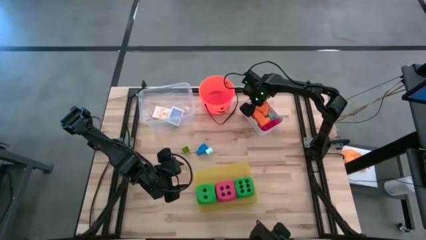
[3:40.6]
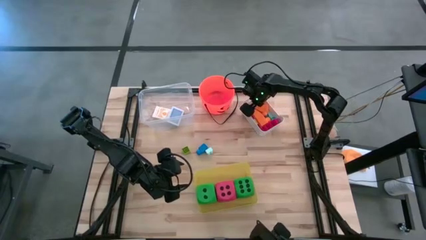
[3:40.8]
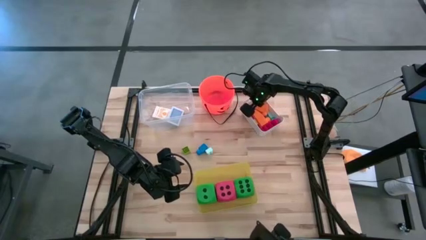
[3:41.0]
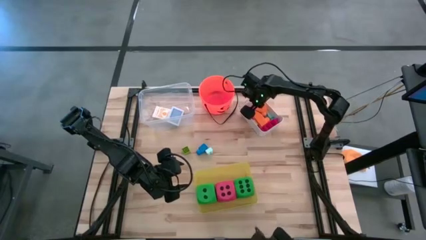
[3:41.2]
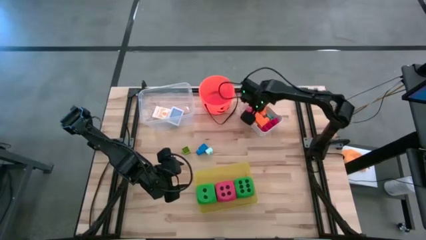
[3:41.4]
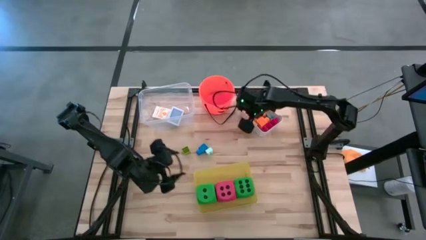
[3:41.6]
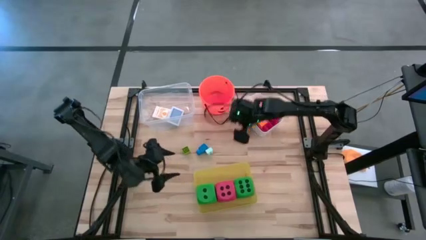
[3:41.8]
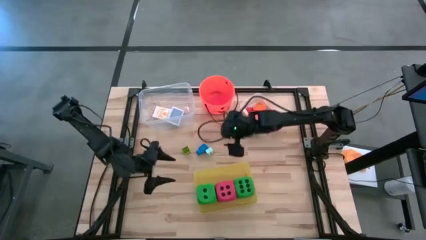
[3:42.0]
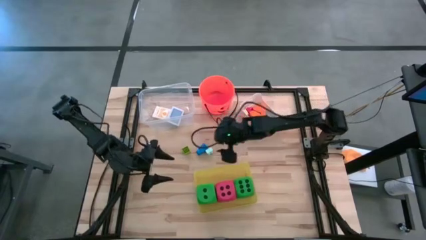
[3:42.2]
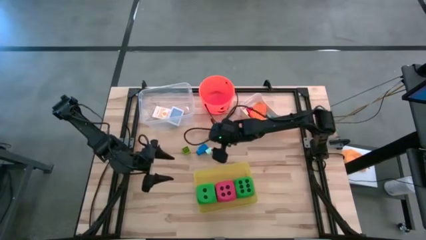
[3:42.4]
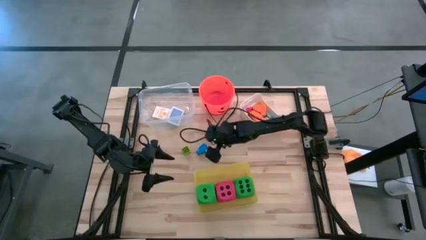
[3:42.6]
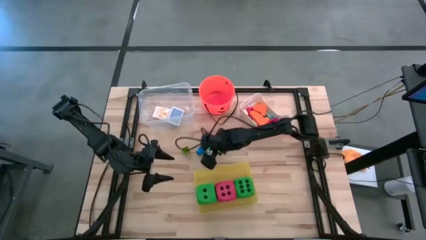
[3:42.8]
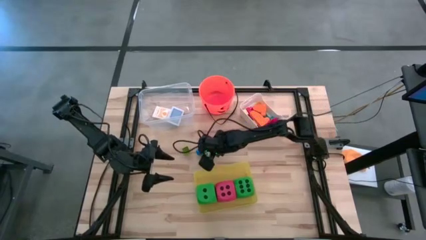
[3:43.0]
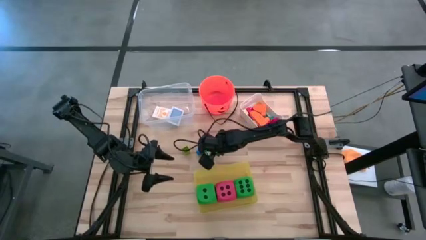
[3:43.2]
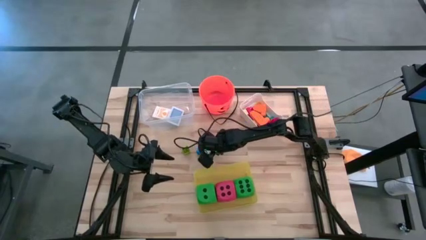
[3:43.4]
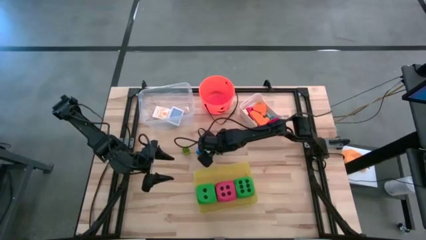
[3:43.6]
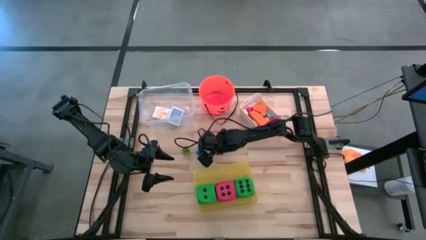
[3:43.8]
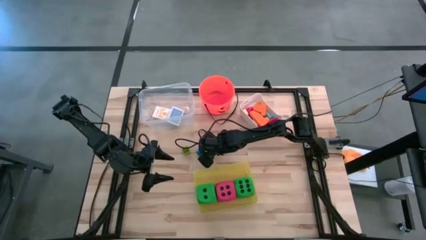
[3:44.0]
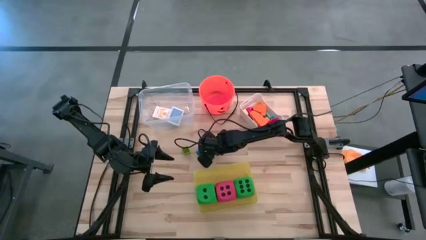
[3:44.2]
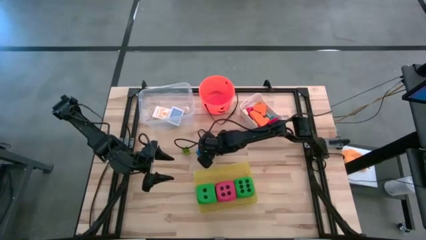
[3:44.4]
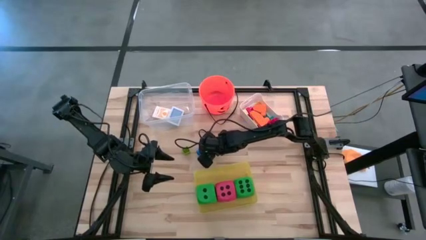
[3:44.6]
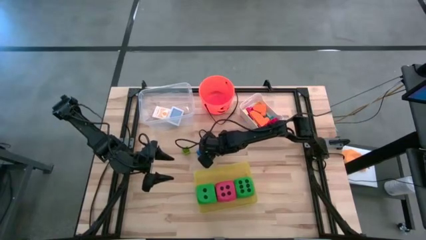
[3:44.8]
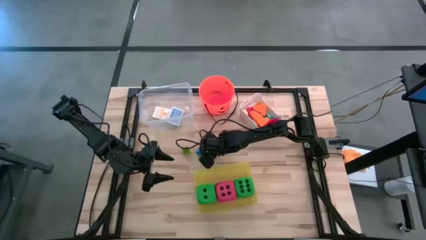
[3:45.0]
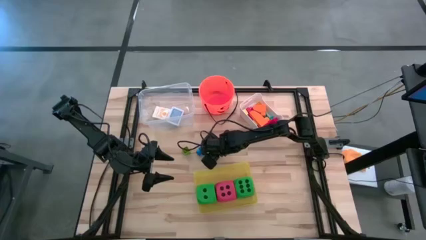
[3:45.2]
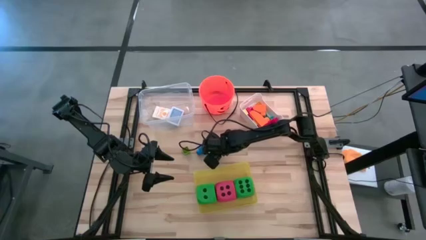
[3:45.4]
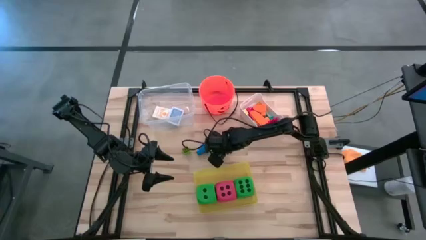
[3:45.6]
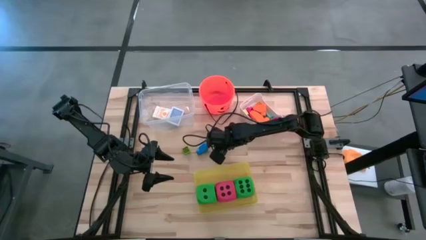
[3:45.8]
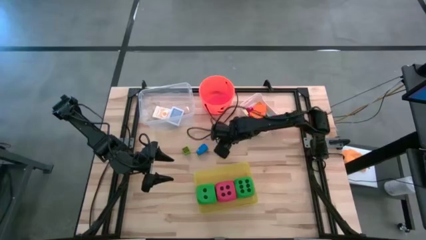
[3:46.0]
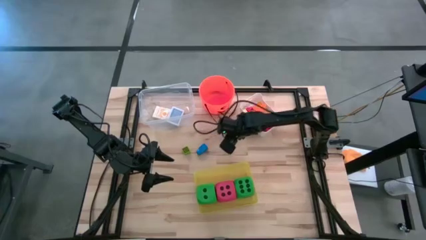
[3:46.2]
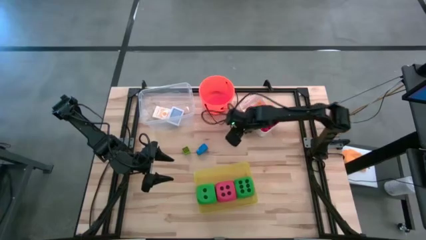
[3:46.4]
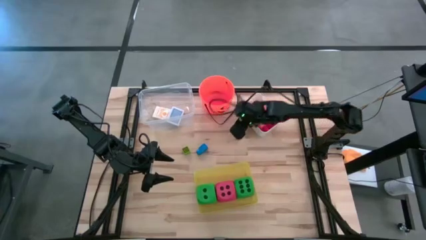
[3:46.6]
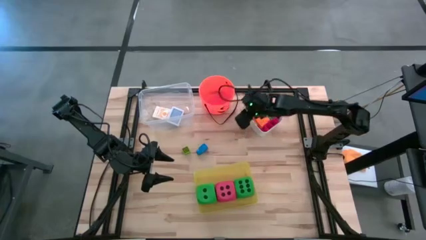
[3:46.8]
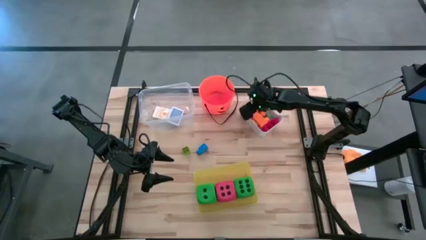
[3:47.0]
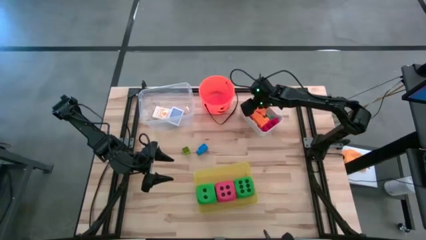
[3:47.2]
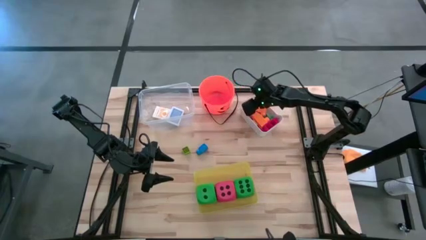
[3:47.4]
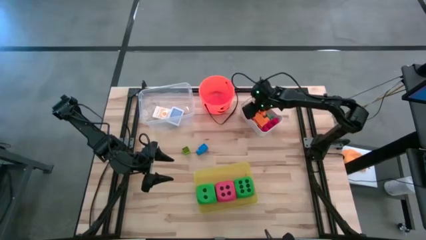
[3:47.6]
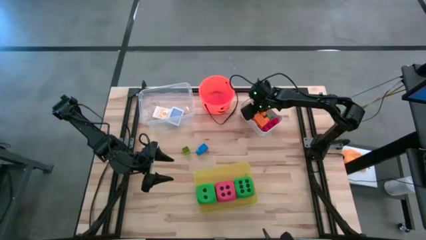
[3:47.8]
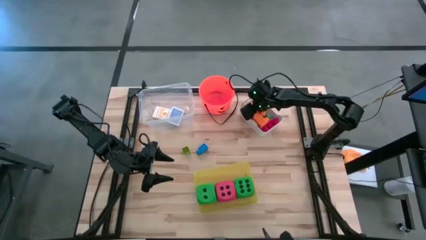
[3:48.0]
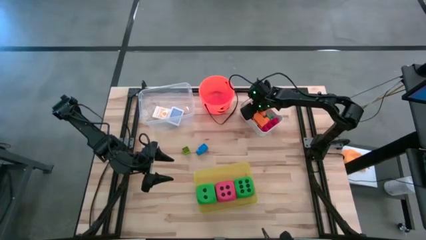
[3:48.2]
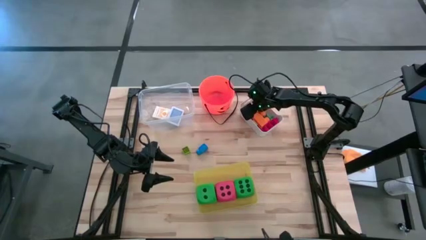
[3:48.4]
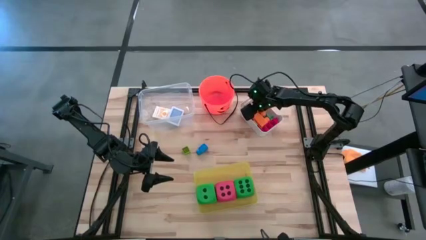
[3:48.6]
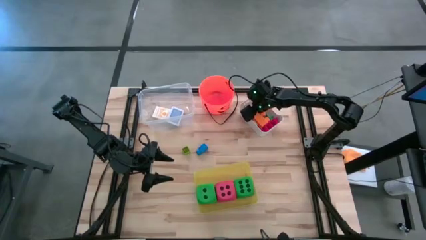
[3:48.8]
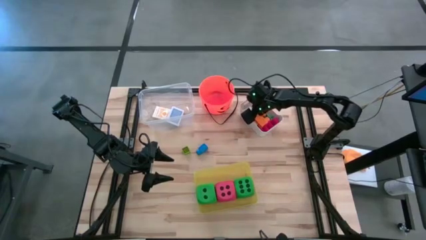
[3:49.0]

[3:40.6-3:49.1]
Task: Pick & Place Toys
Put the light blue game piece into the white bin

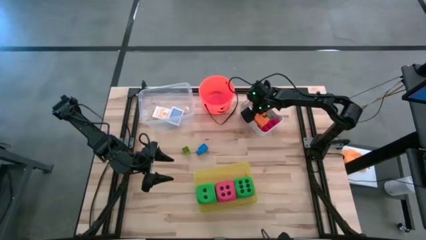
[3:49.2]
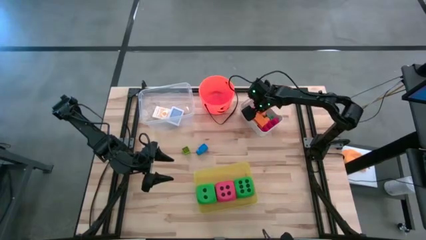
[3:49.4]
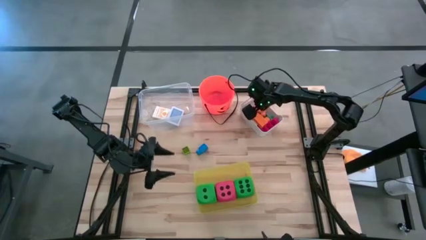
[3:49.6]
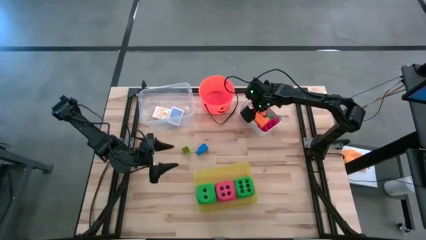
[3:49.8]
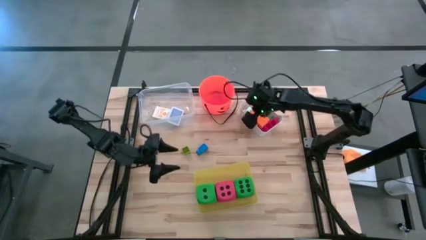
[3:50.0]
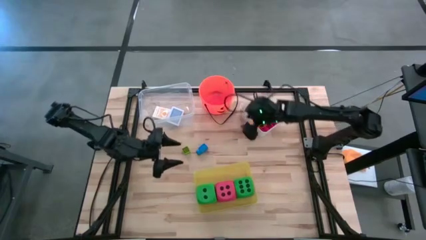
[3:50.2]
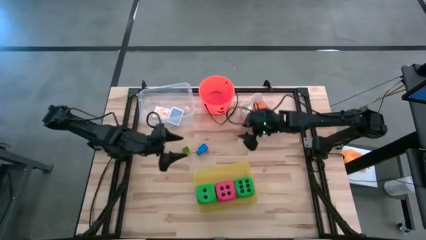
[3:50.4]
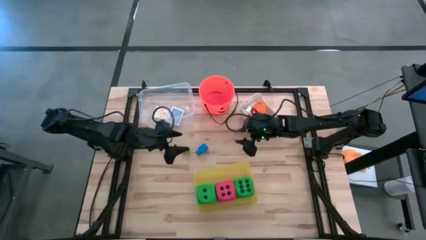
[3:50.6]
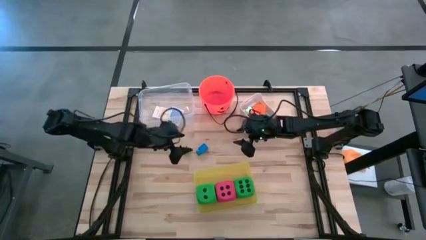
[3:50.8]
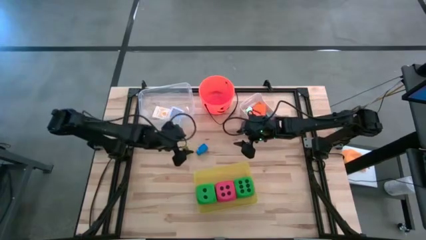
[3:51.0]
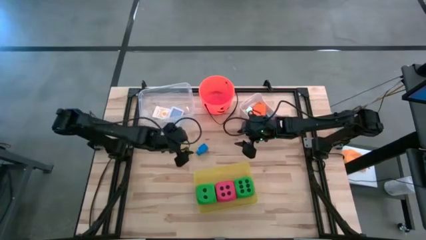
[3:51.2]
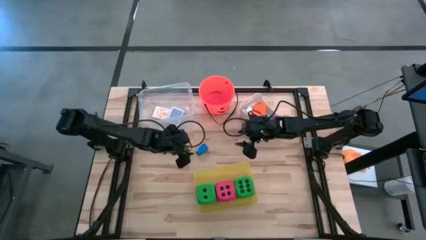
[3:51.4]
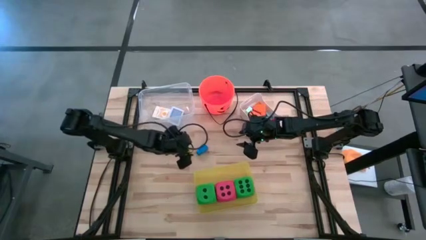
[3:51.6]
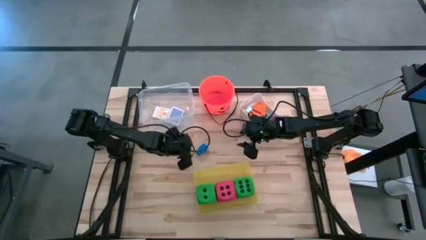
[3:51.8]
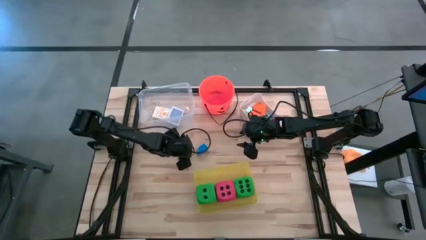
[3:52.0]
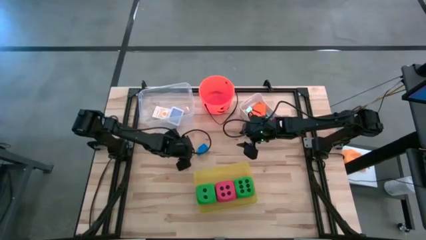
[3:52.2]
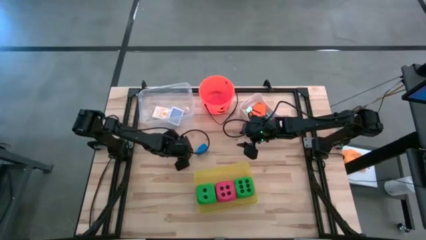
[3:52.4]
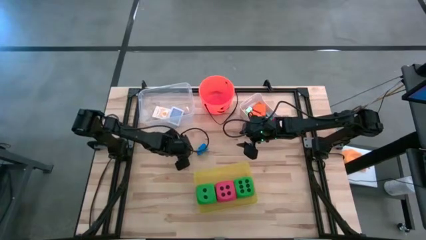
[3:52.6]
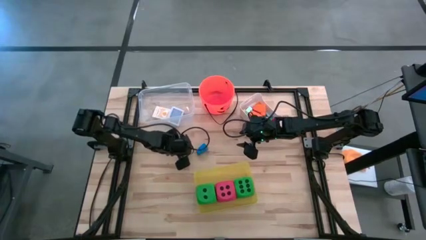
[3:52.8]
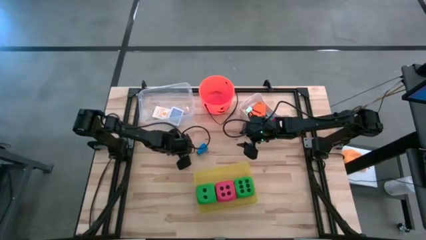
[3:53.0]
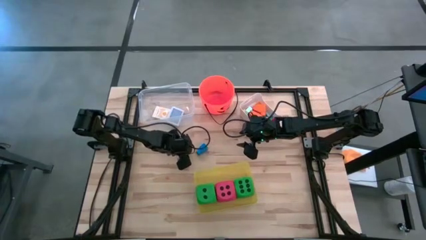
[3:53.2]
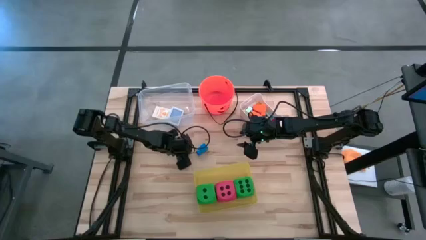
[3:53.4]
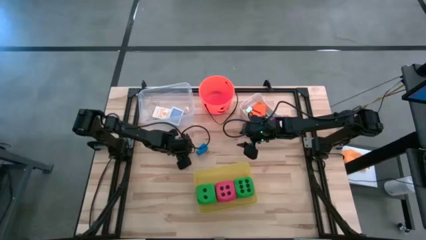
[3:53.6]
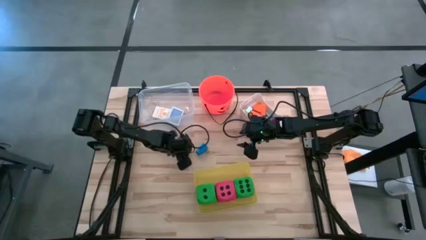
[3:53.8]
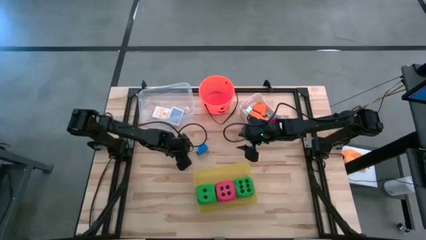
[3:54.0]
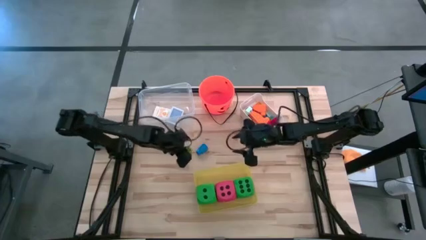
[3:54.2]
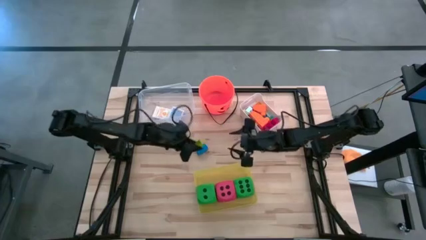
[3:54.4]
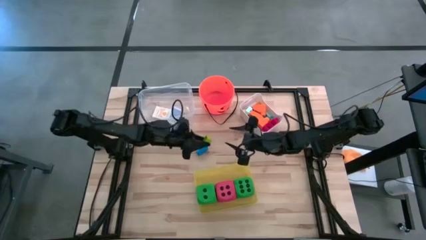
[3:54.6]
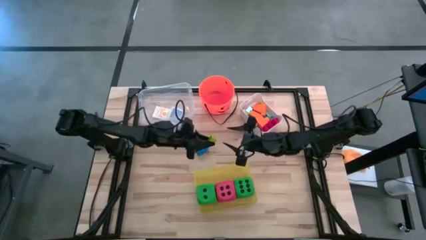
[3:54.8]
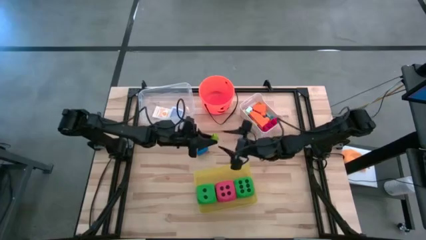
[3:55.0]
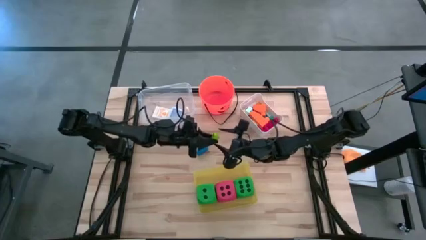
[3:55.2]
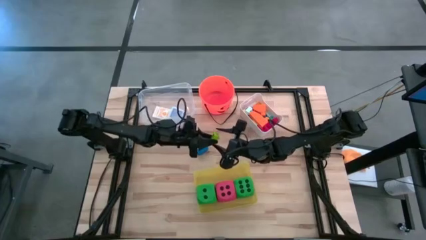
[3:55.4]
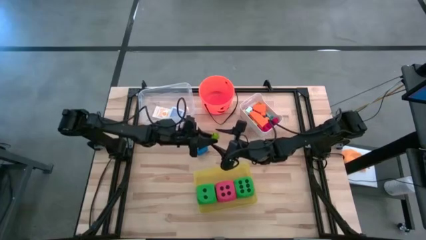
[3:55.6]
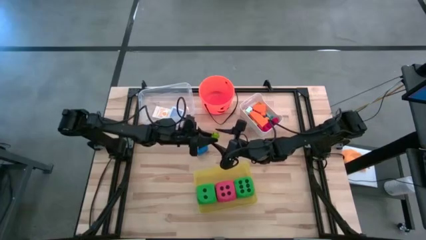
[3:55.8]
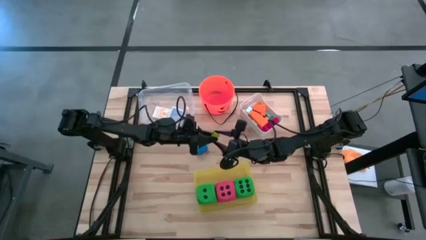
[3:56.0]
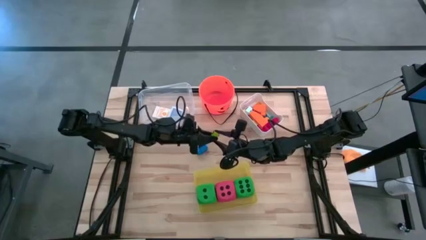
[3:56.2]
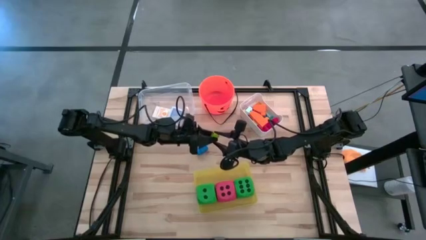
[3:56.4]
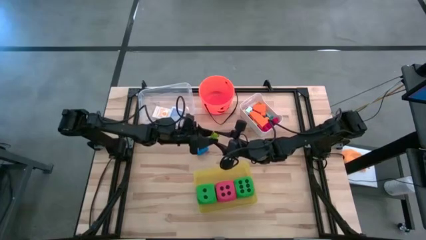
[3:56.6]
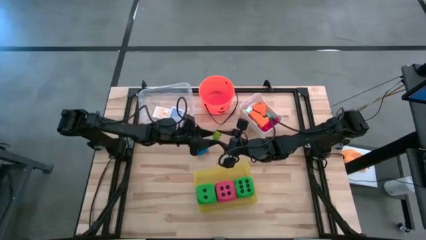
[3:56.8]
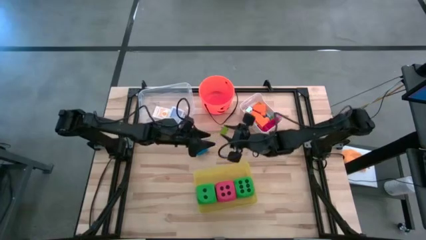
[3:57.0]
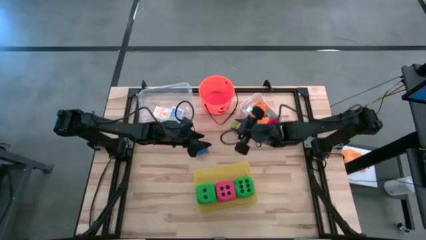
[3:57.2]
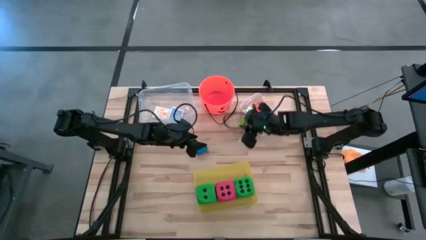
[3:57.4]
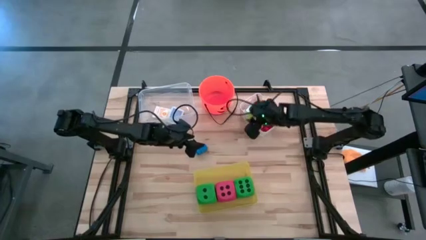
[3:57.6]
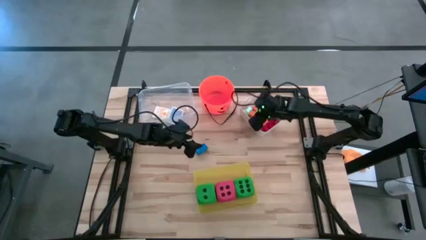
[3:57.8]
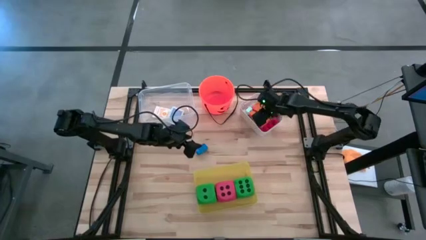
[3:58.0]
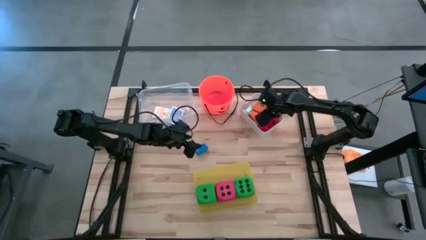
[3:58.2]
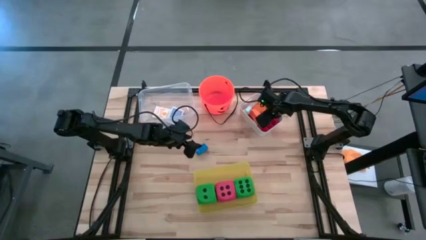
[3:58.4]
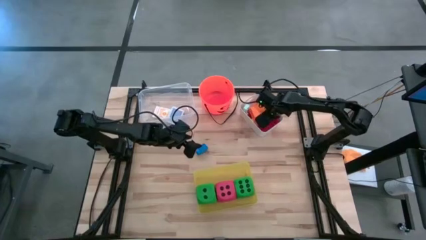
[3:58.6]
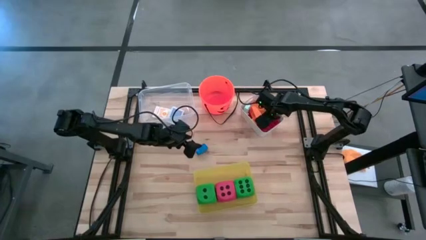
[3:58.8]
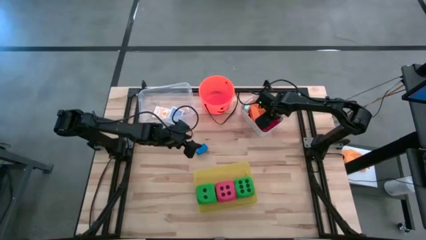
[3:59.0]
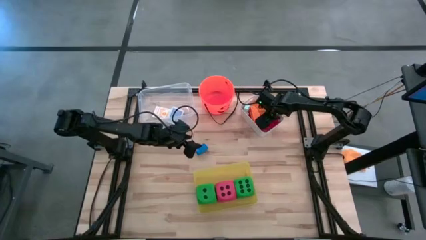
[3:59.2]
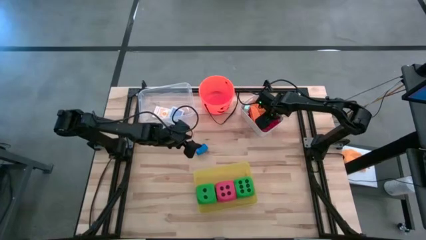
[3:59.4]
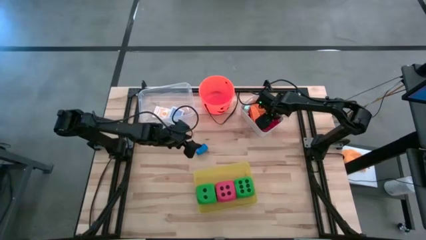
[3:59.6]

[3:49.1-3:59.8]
Put the light green game piece into the white bin
